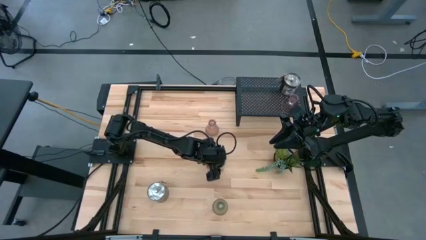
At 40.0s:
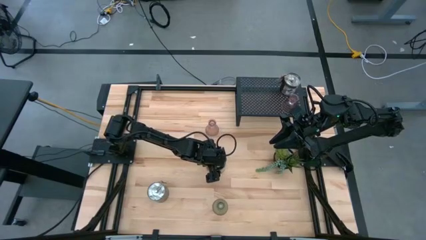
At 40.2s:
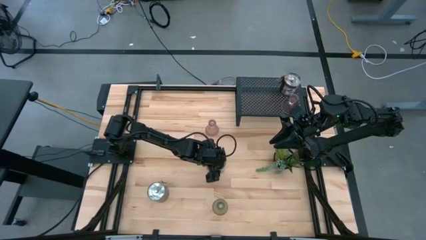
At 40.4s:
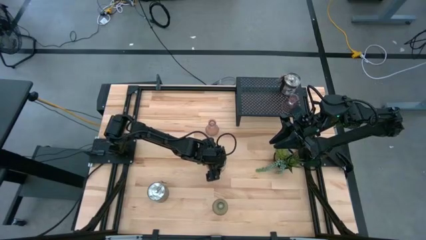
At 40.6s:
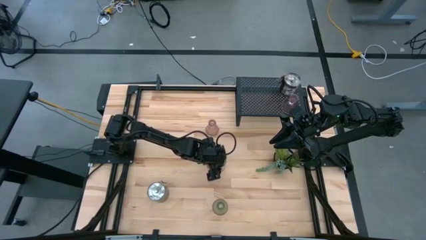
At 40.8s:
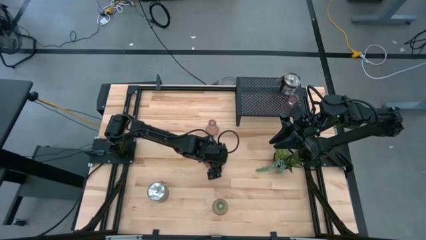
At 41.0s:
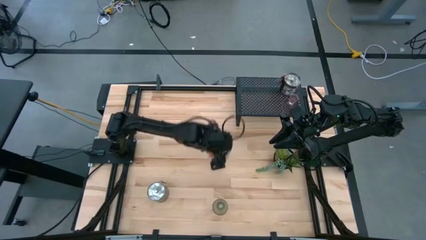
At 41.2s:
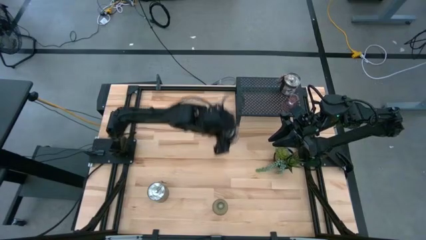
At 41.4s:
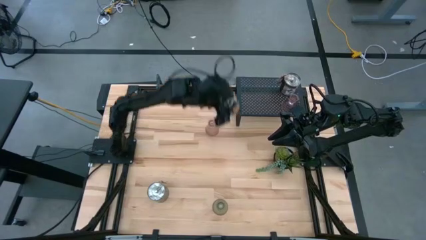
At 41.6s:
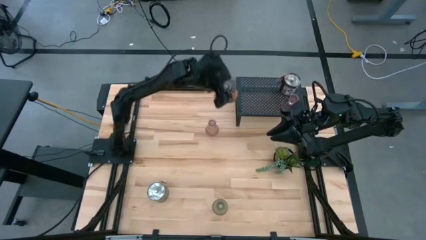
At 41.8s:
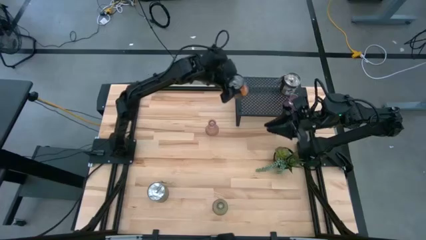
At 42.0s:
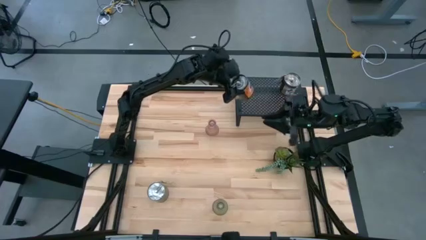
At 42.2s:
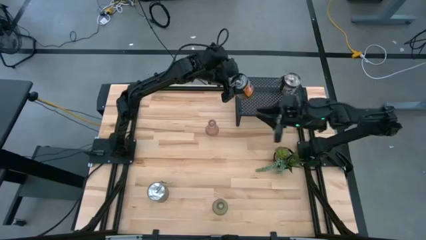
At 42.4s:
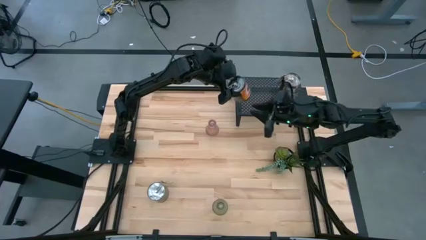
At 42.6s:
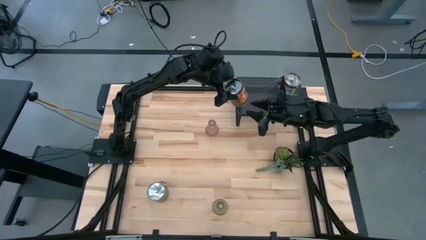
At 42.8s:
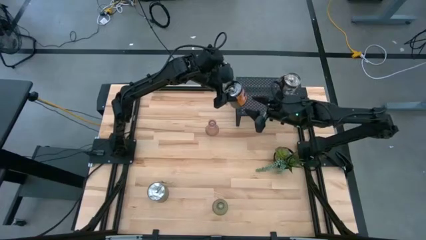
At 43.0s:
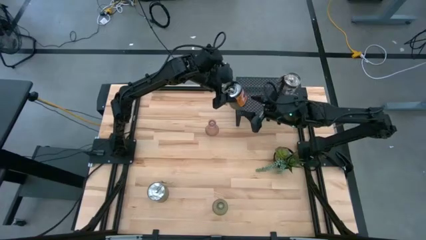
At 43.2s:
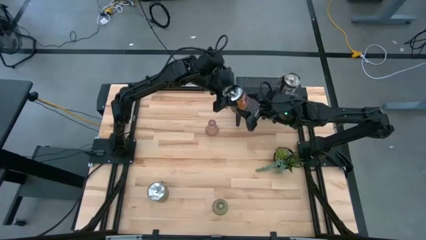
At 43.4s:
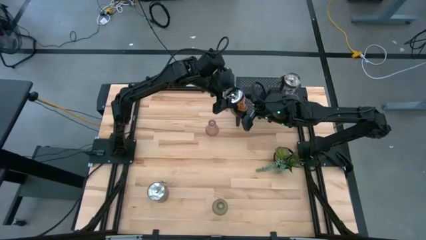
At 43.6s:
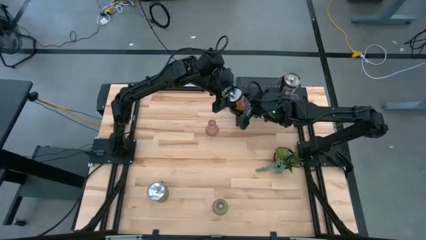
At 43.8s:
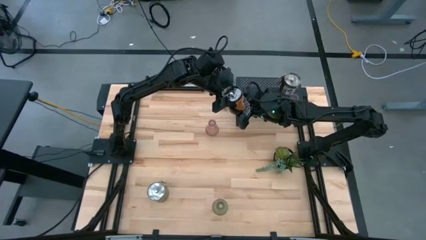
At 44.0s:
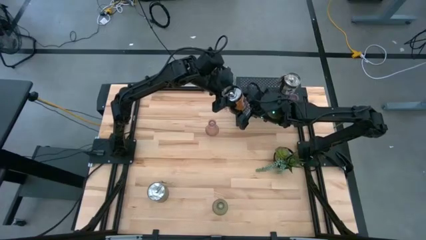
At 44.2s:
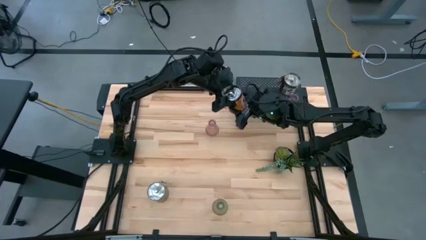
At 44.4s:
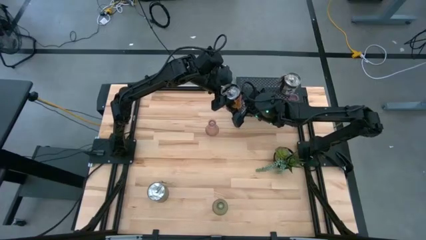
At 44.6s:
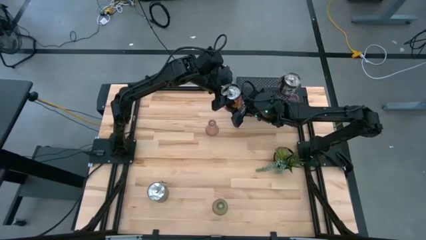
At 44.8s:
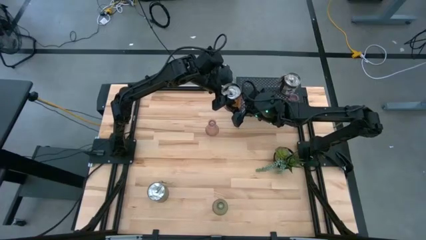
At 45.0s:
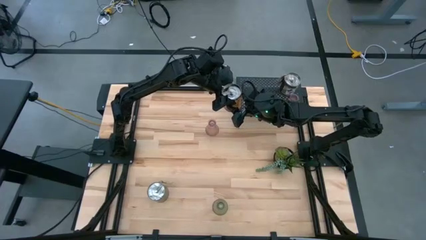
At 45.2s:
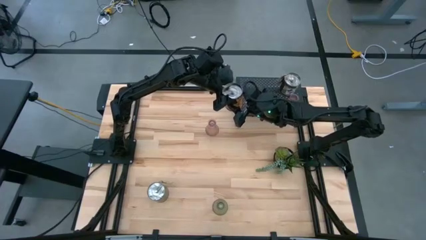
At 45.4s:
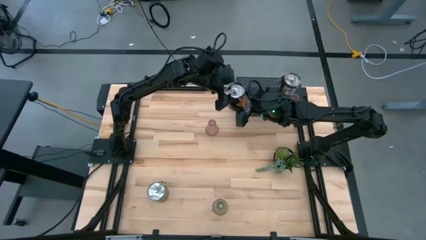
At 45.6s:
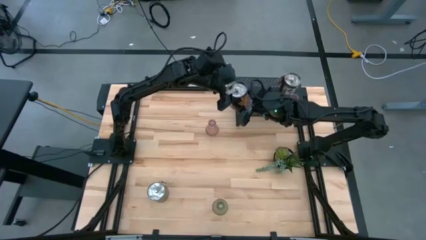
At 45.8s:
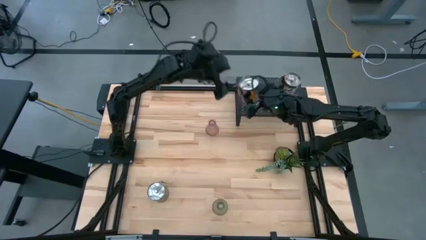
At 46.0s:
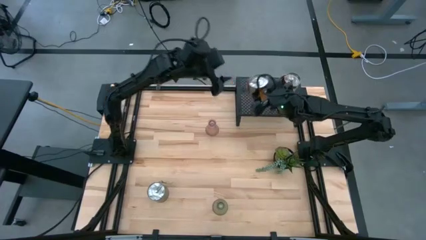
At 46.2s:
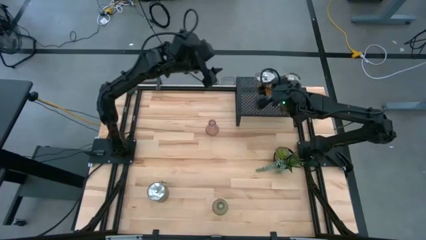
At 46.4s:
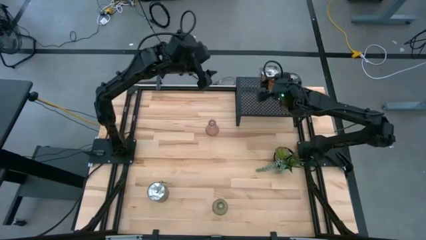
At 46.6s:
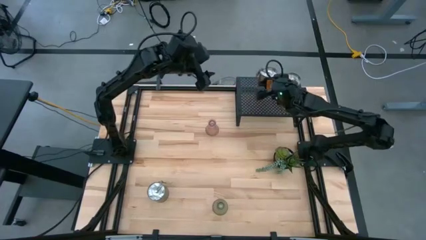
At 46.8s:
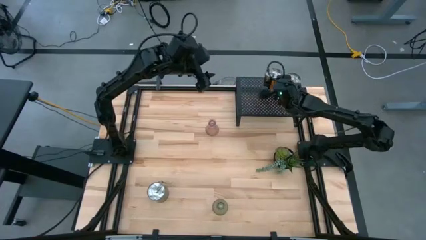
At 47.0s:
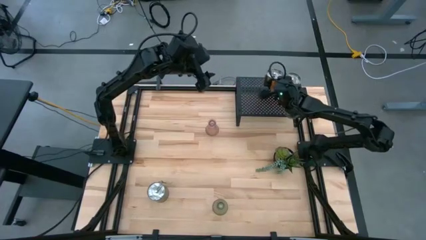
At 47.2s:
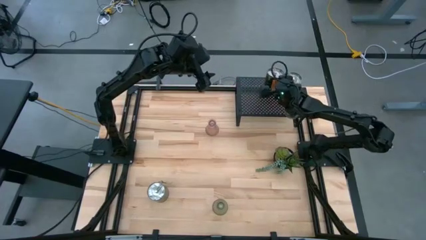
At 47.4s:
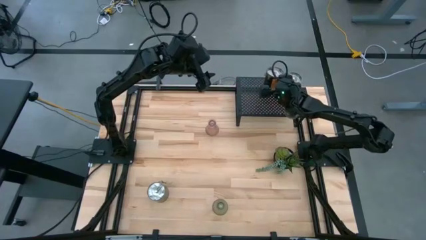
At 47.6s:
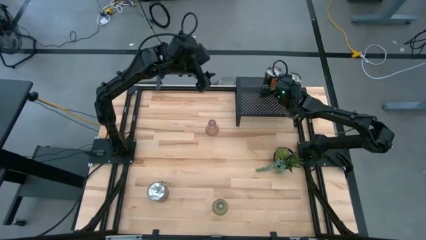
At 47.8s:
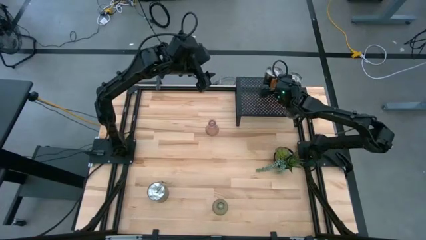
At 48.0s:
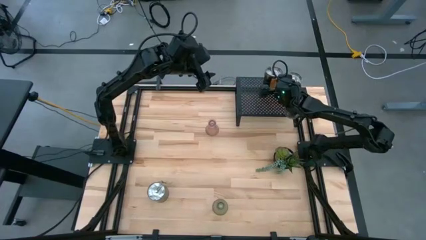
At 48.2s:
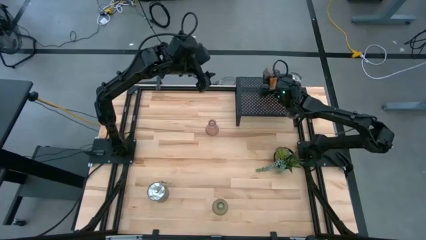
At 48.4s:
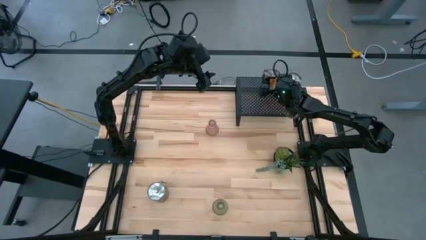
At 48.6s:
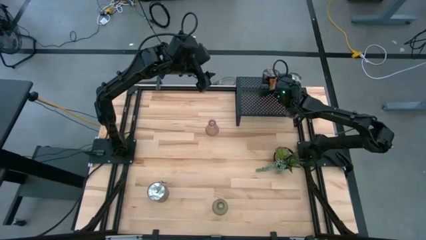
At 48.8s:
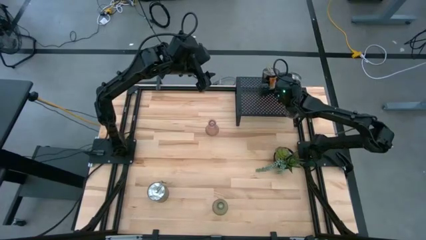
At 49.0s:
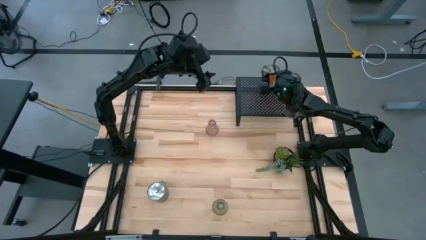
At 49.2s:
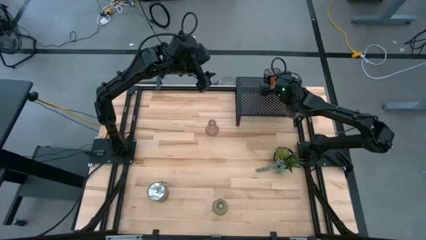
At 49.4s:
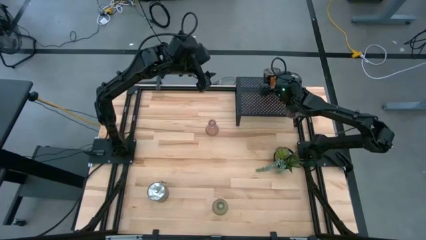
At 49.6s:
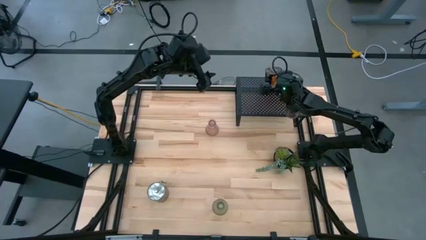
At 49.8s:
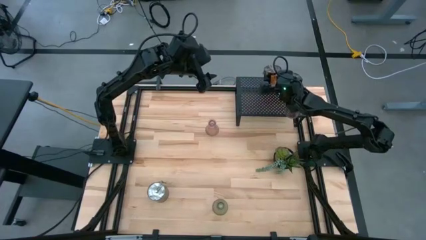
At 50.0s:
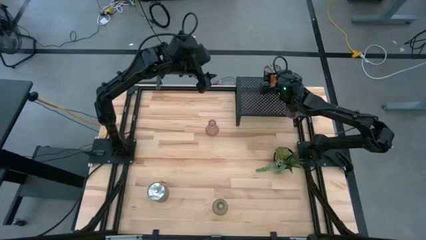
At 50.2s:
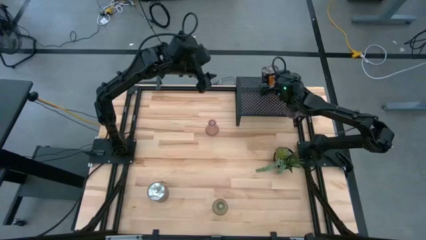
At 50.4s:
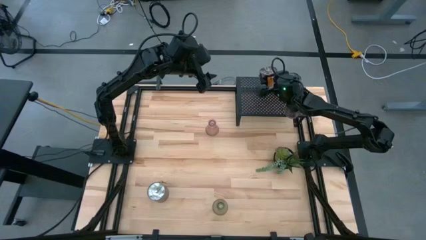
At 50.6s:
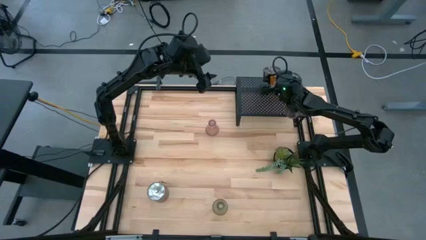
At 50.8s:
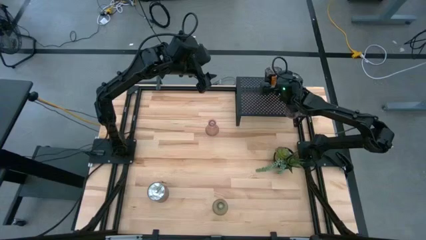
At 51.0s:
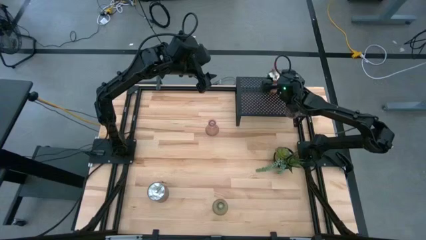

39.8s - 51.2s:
Task: Pick & Place candle stick holders
Put the top silver scented candle on the shelf aligned with the silver scented candle
